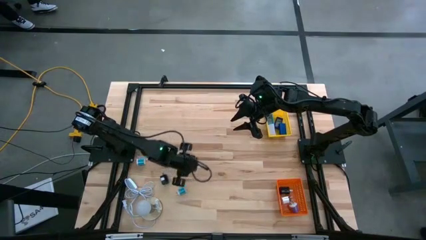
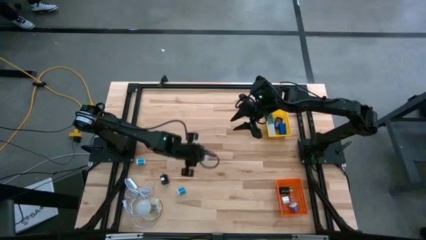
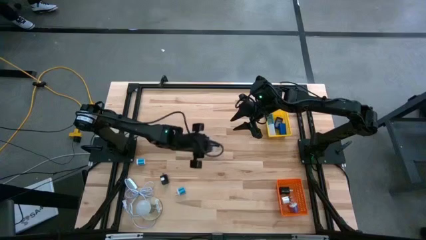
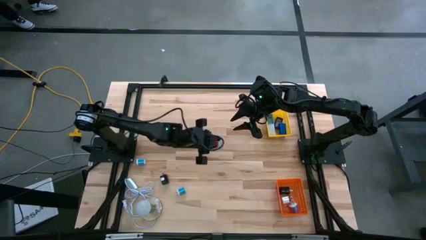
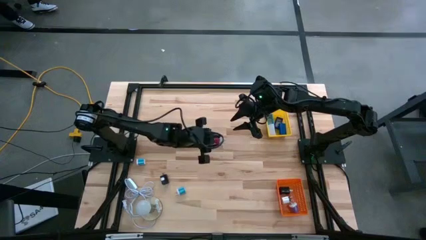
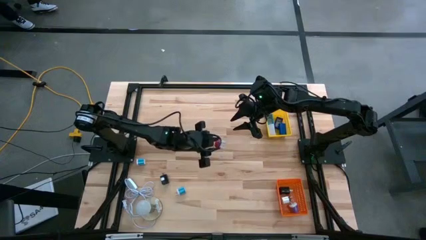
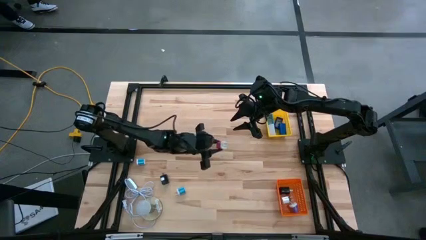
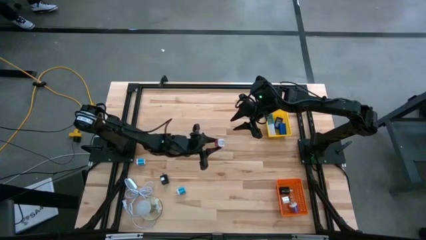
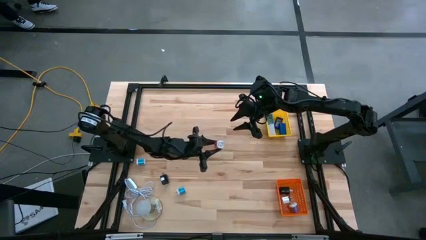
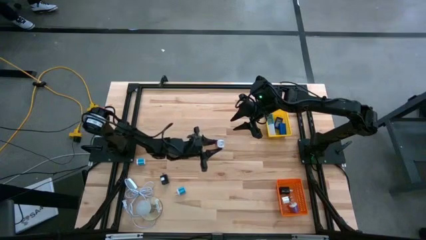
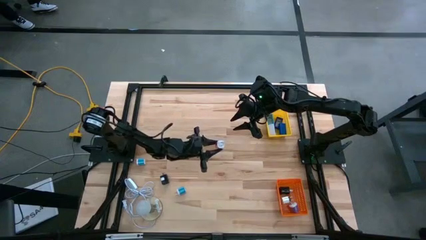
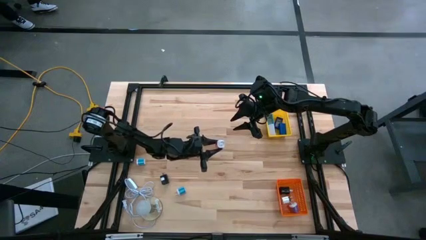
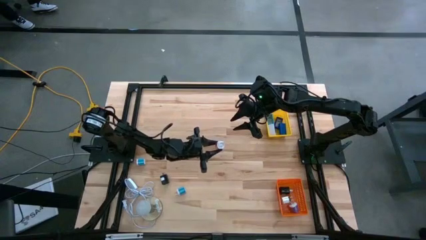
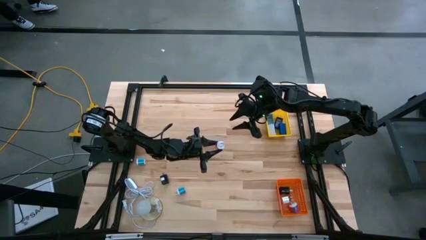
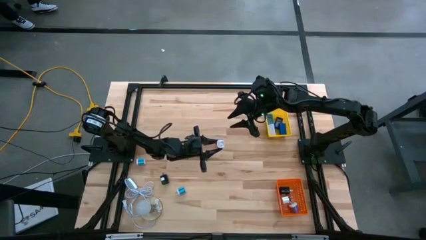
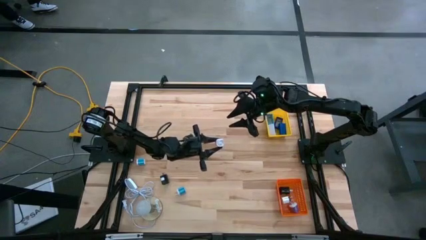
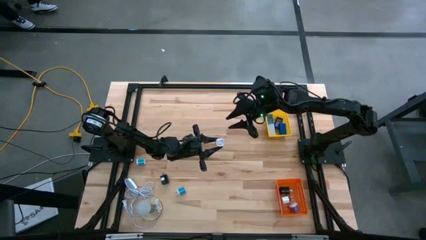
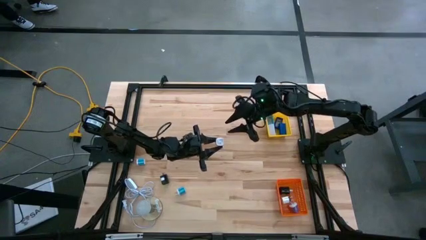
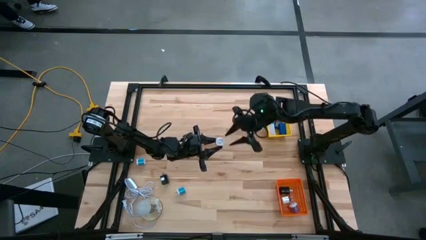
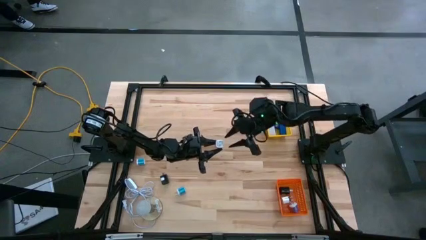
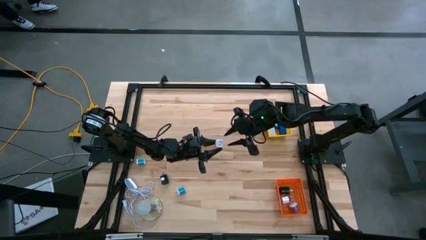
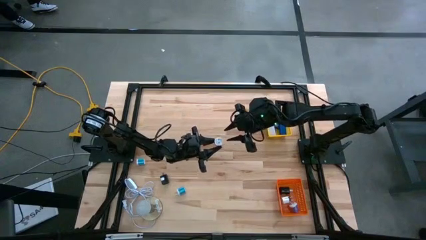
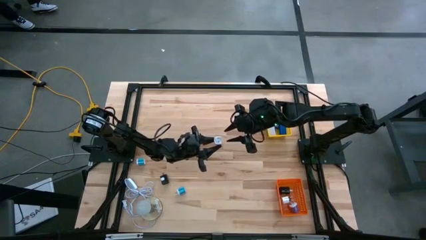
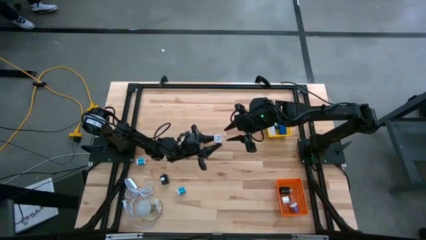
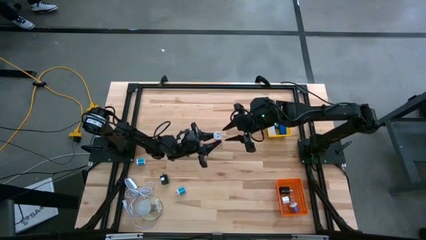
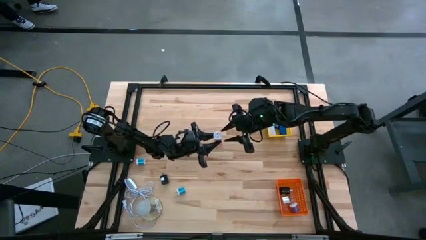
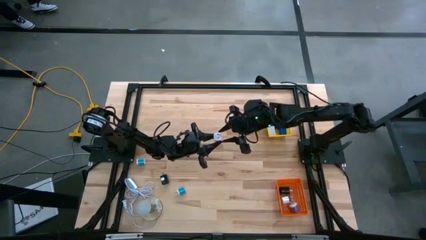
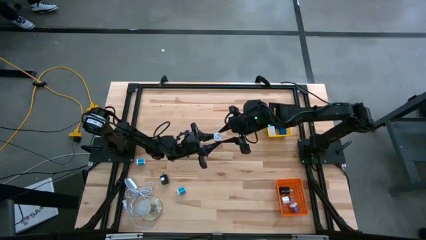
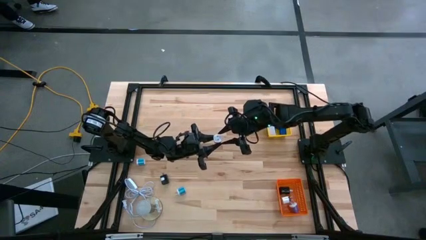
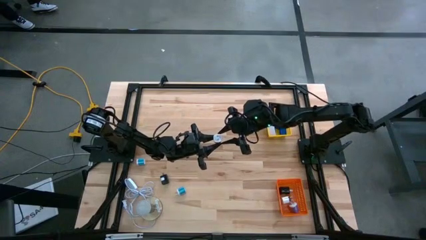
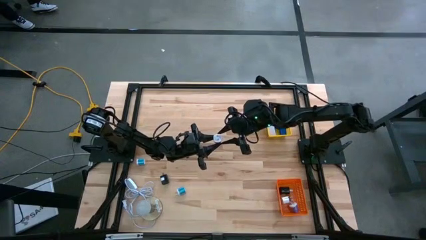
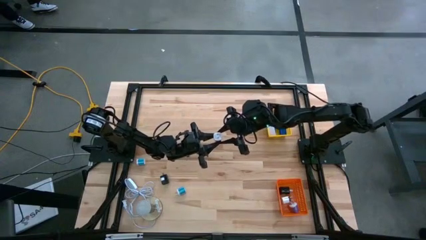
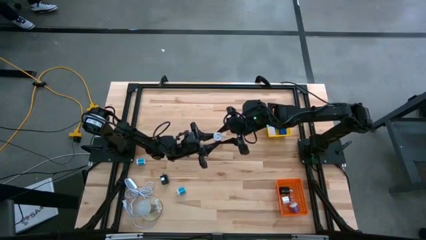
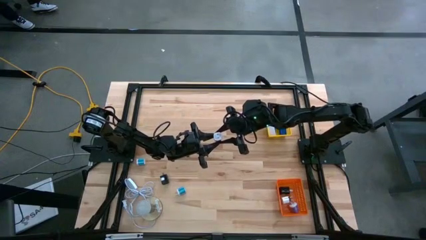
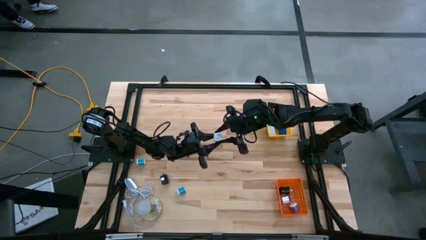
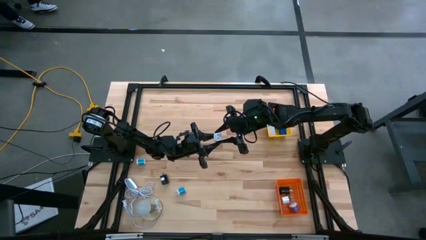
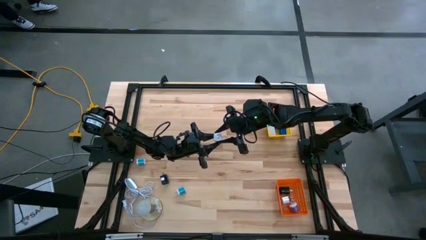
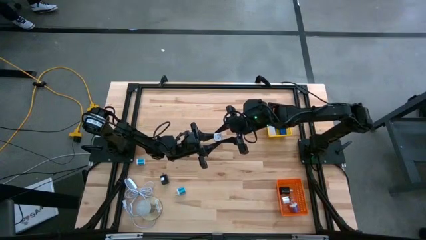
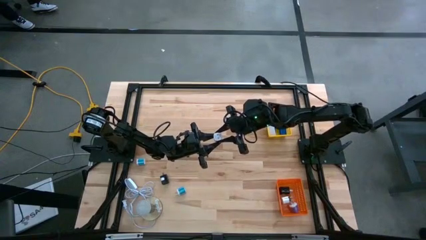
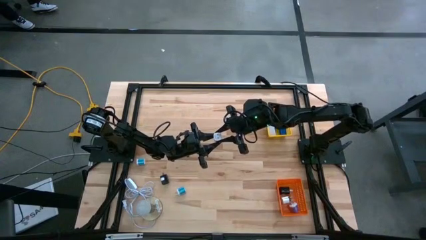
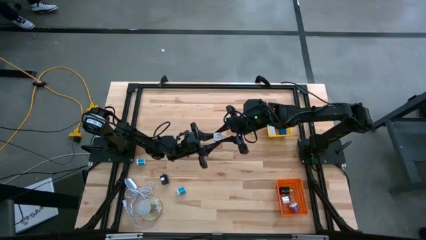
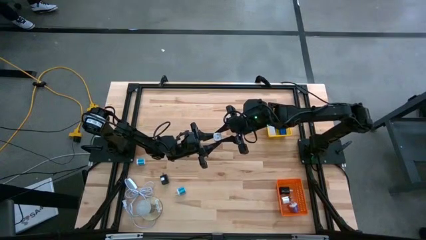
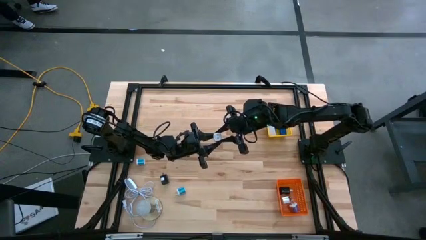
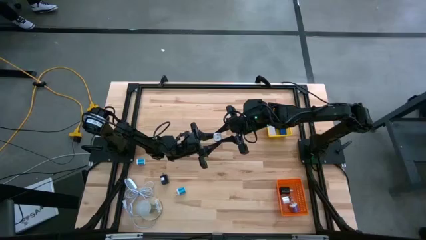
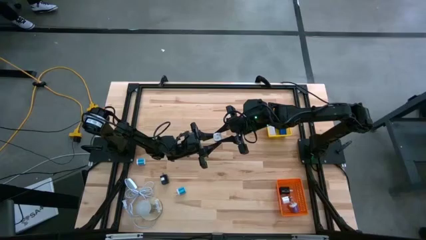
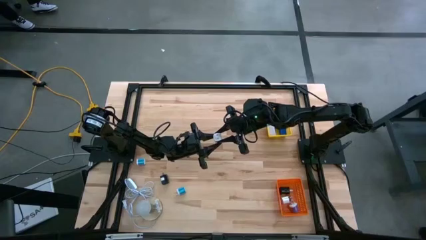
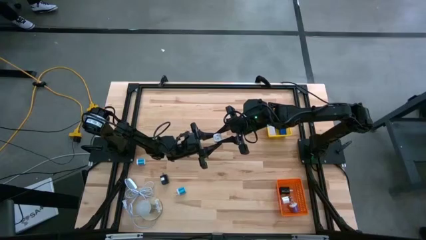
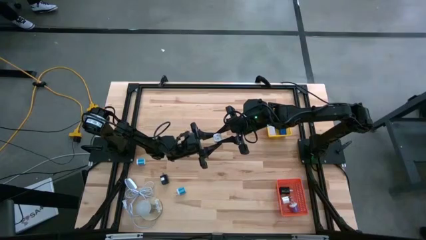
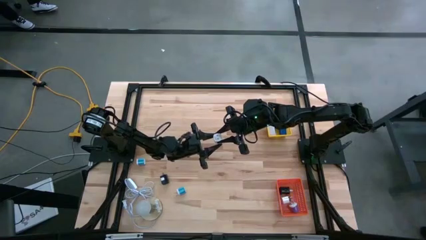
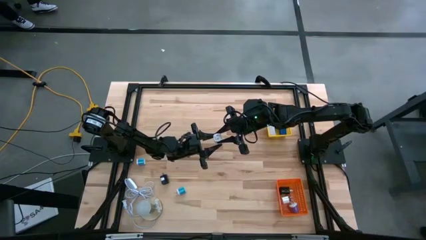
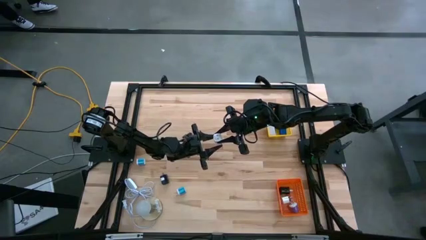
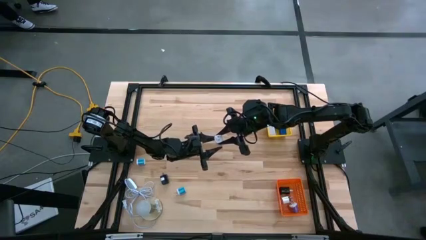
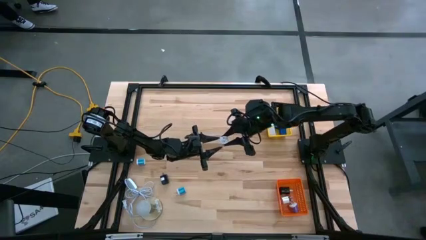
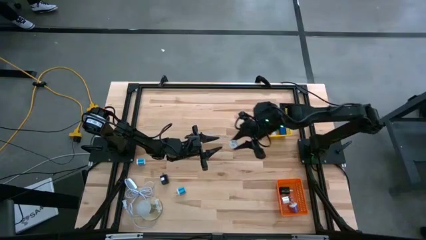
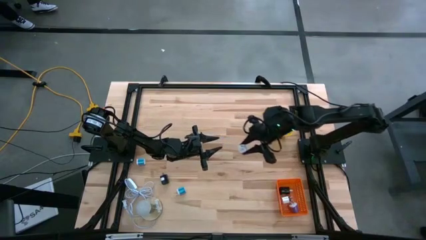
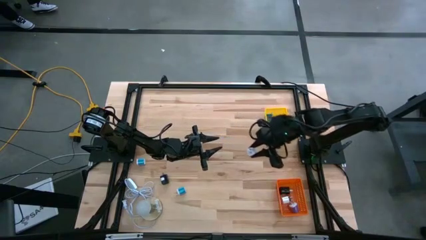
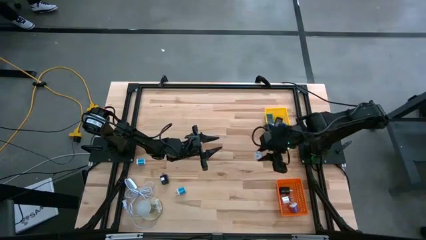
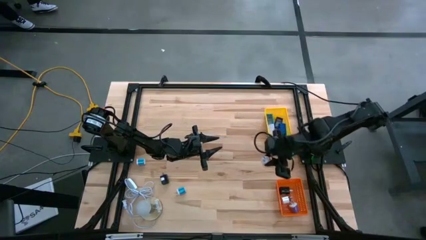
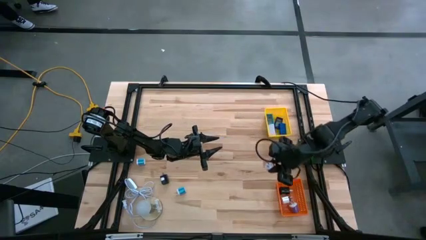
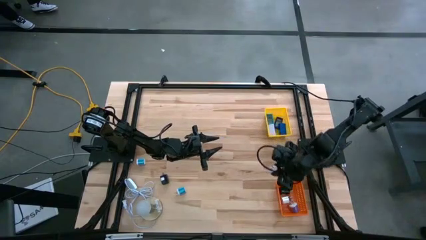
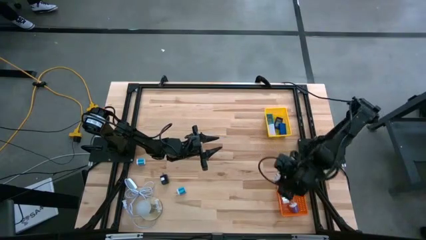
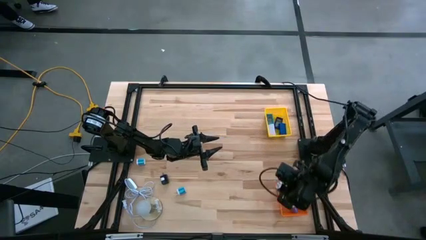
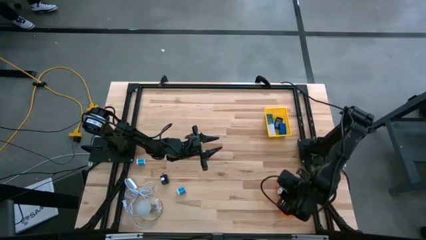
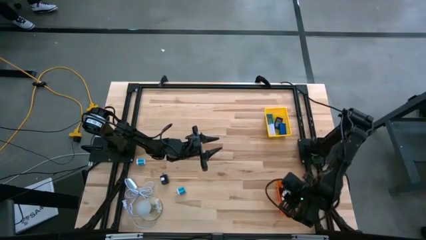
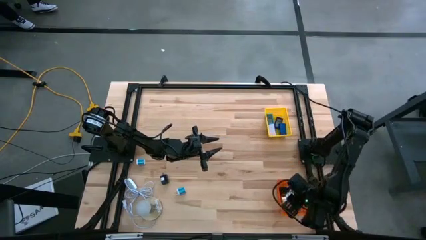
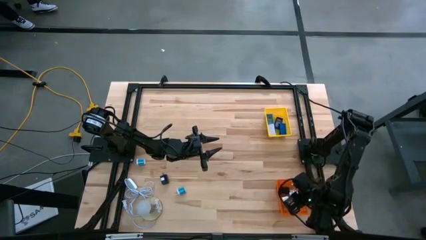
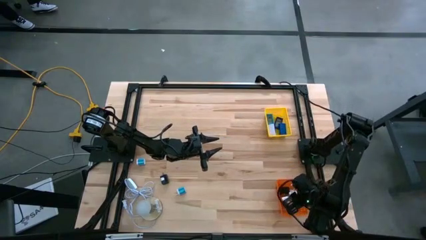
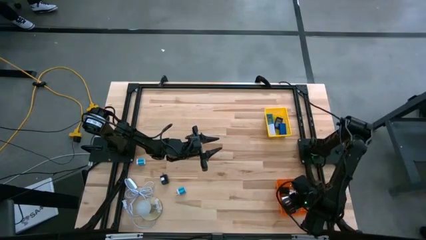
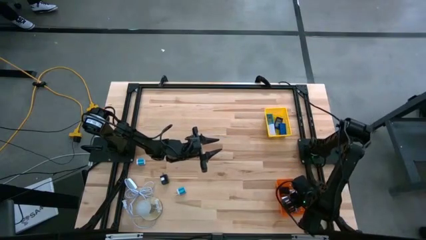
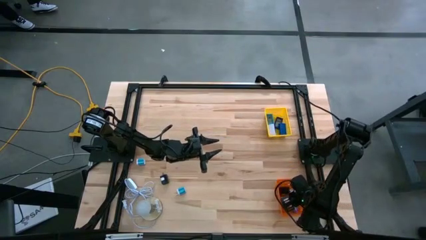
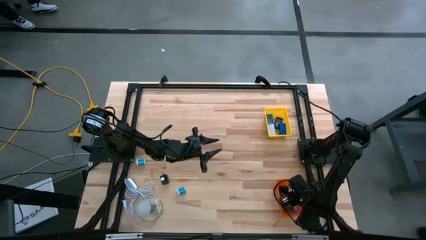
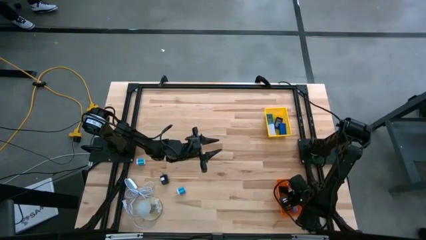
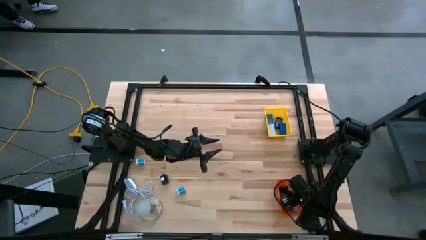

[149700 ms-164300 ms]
Task: Pick & Place Office items
Put the pink charger adapter into the orange bin

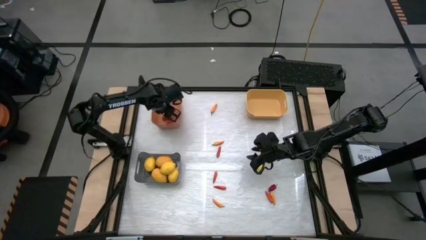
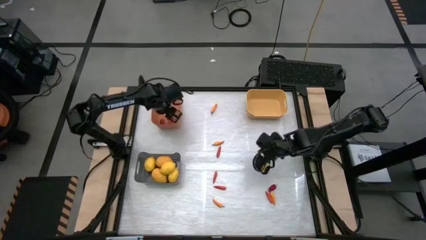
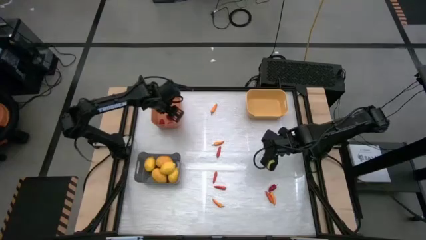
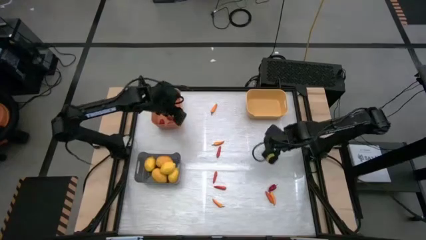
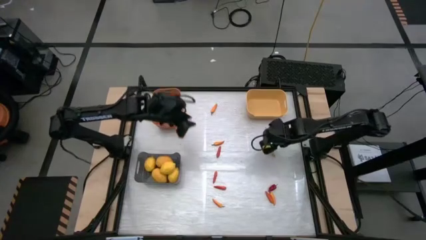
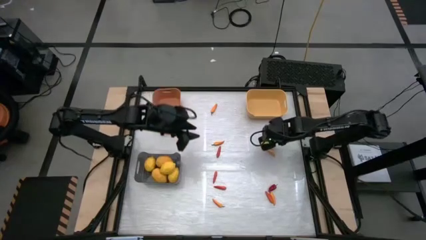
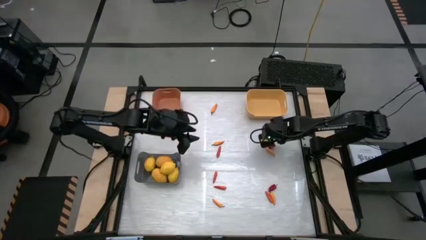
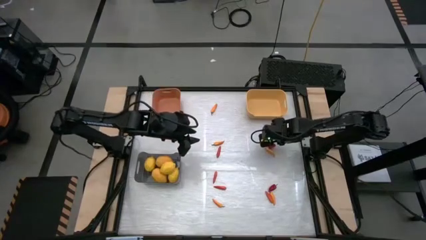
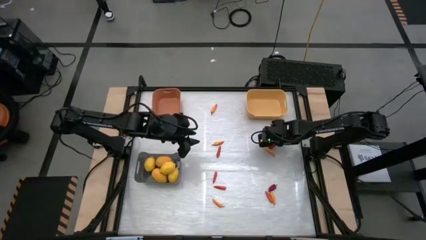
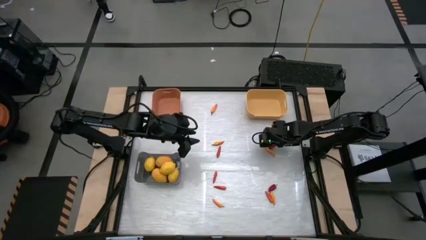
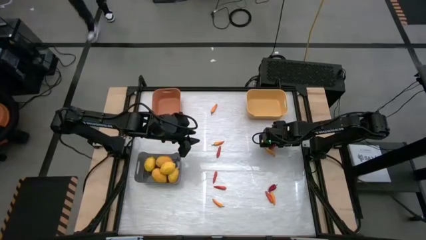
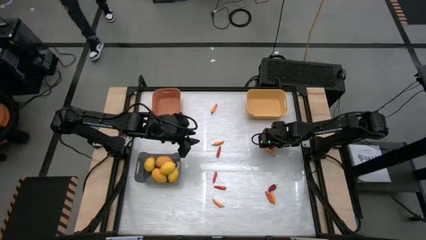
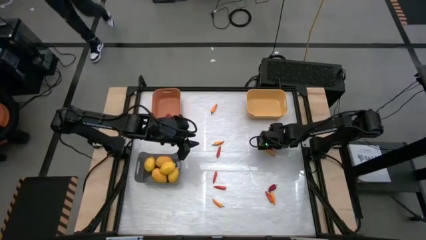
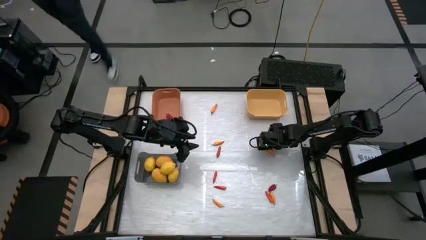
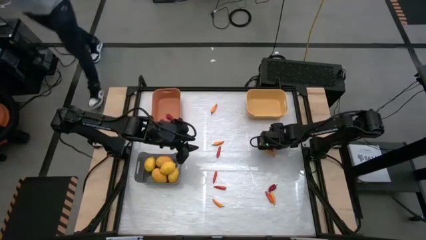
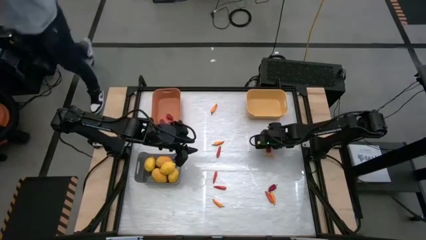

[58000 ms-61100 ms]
Task: Sort produce into baskets
Put the red bell pepper into the orange bin
